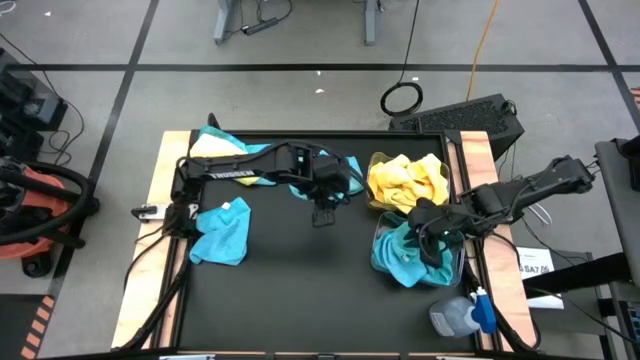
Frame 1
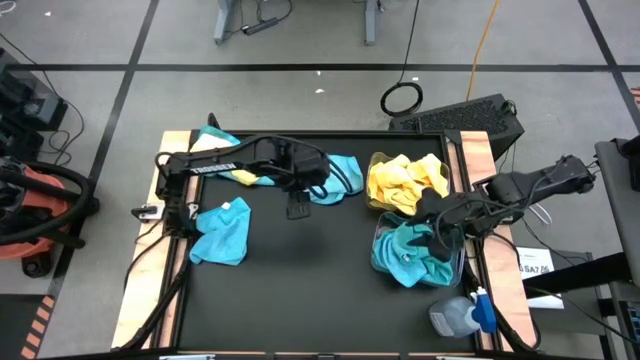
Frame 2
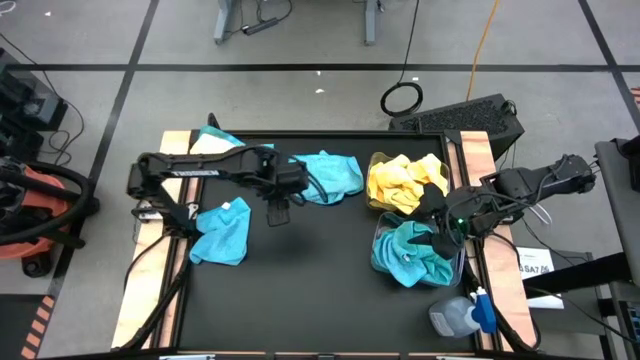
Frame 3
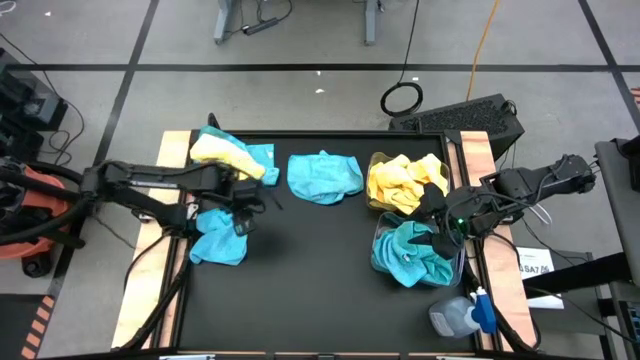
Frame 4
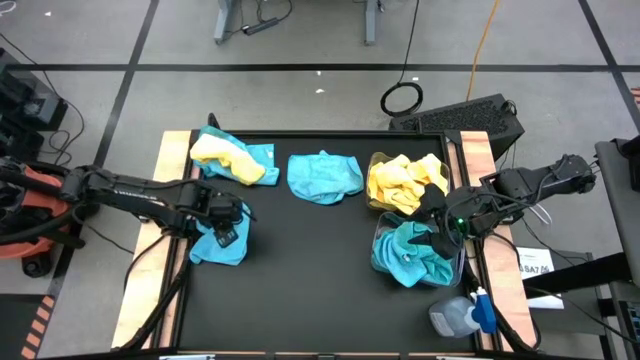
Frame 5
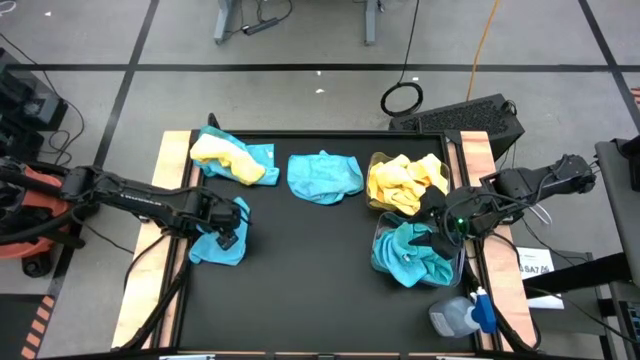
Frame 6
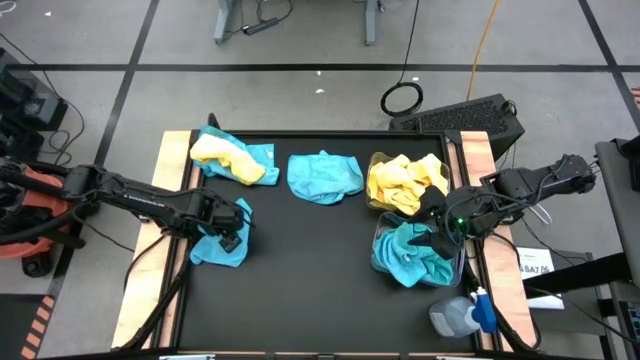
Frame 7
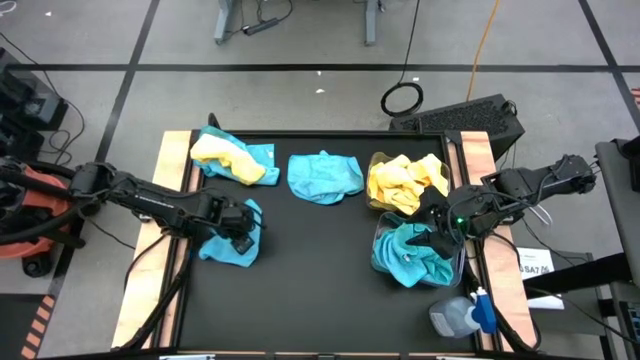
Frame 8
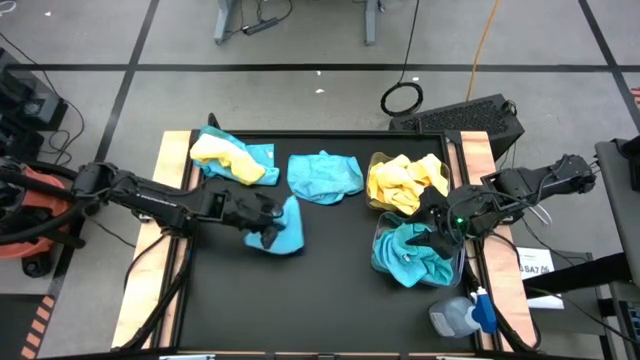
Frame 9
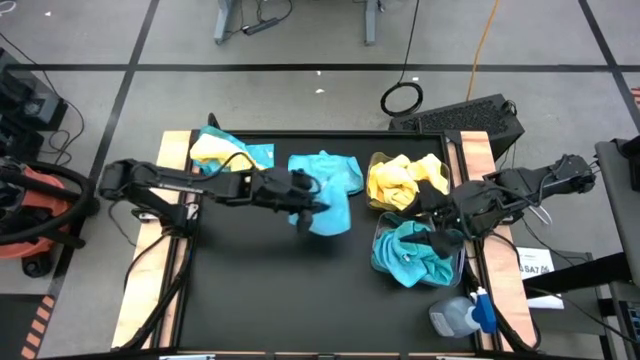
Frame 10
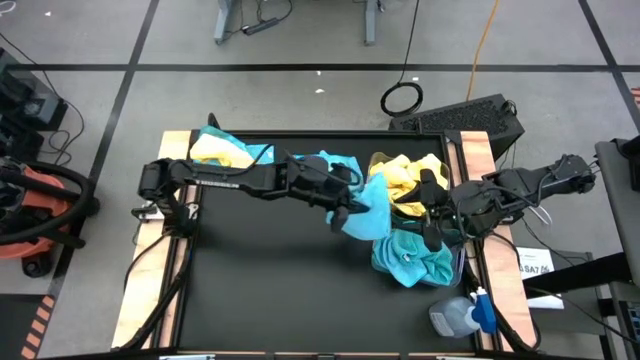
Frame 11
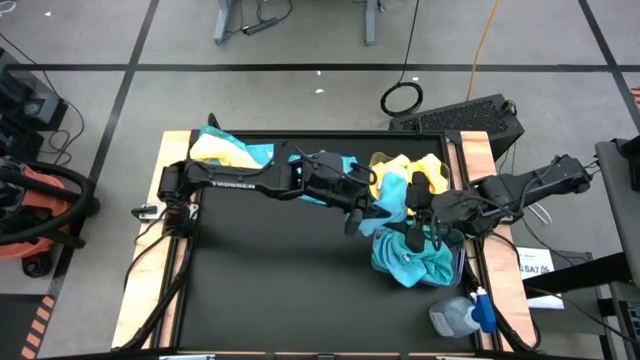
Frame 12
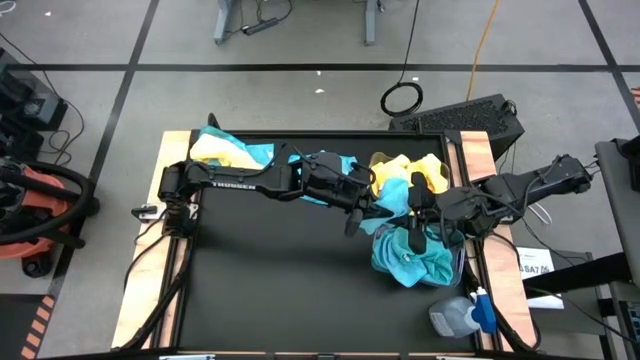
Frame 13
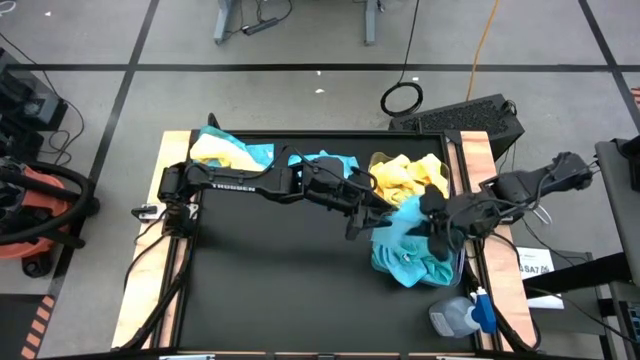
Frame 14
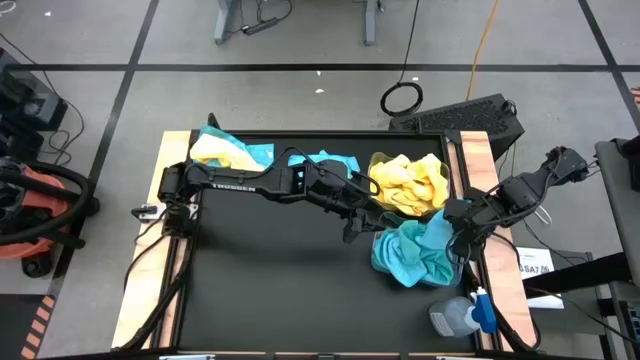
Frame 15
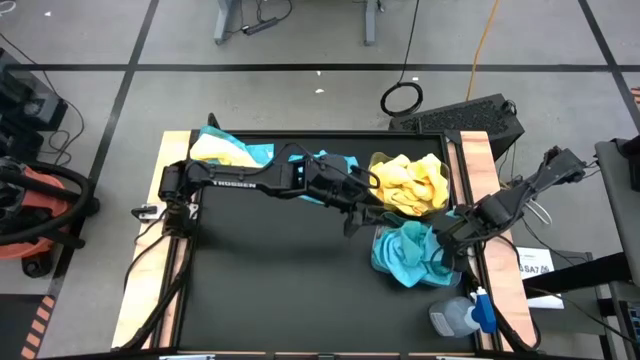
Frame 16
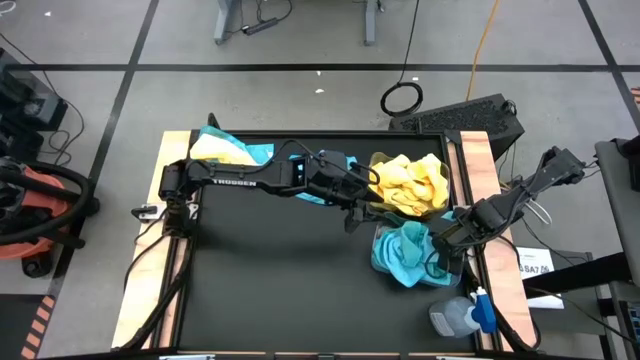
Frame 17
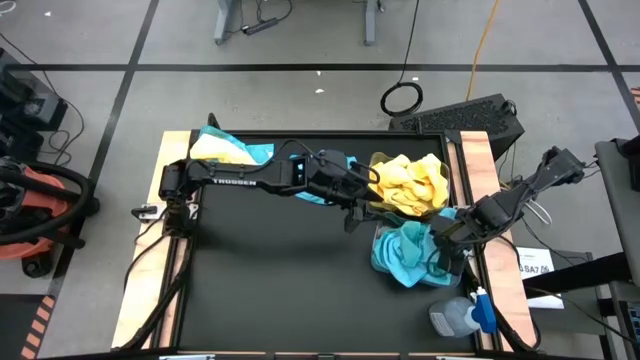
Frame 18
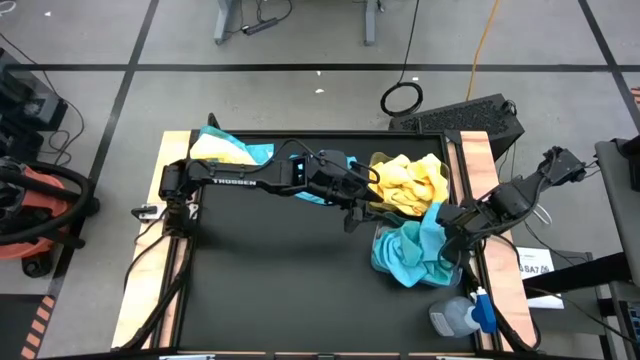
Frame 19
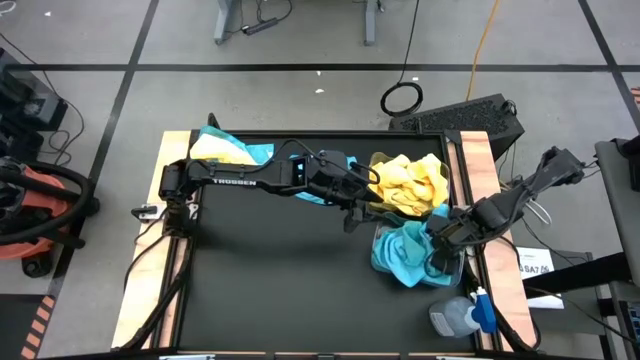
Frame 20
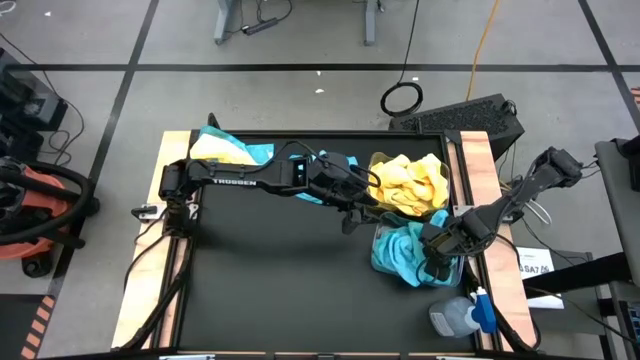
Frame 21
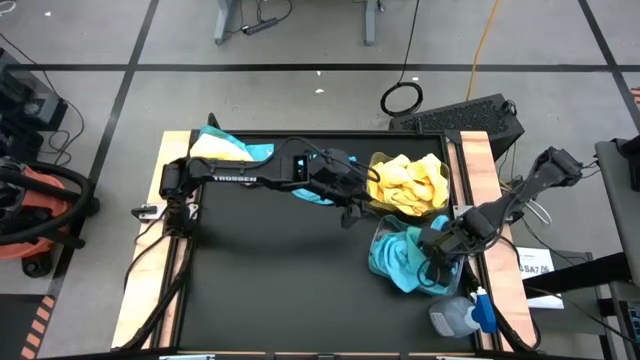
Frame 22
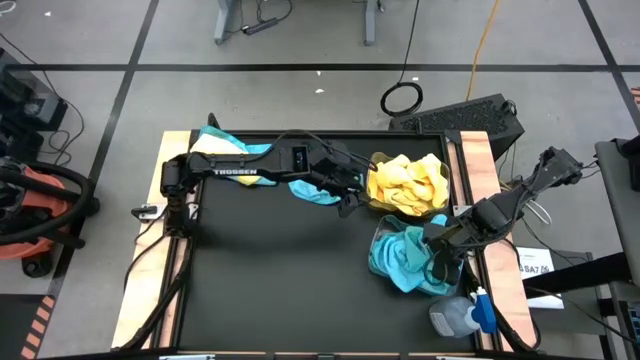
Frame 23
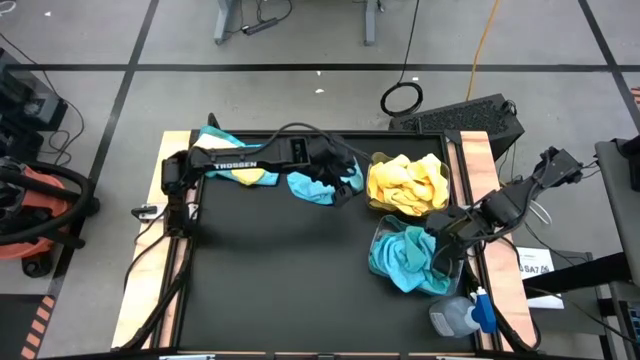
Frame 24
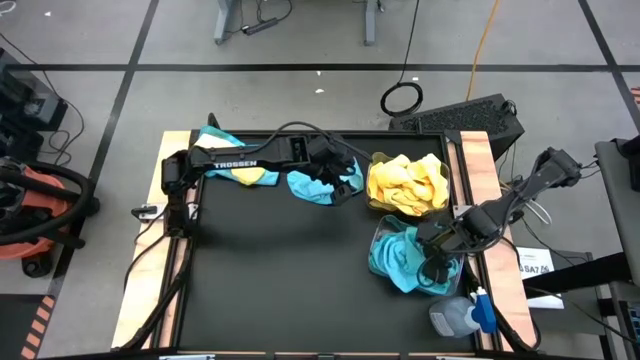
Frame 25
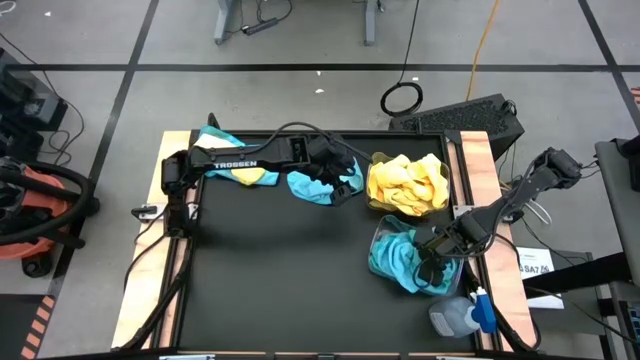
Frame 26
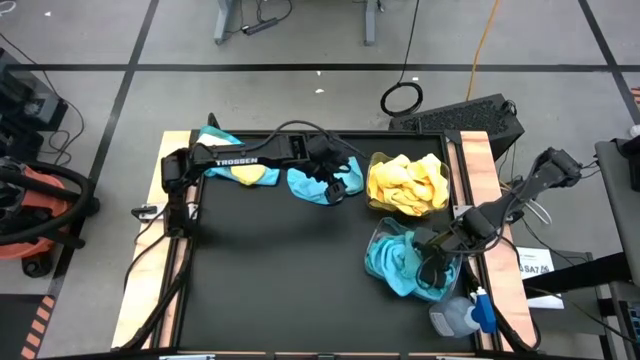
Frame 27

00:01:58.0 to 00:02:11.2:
Task: Sort microfiber towel by color & place in baskets
Put the blue microfiber cloth into the bottom transparent bin

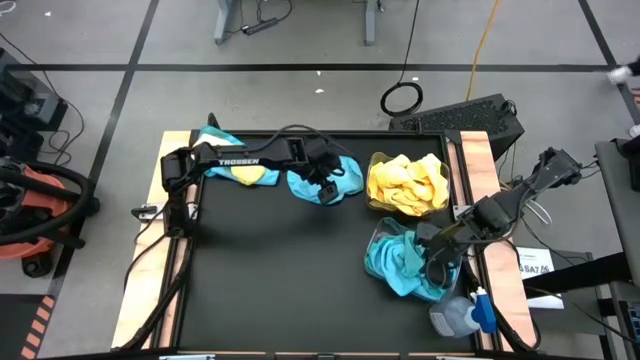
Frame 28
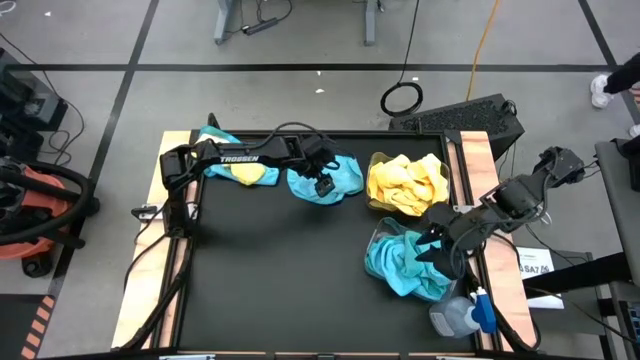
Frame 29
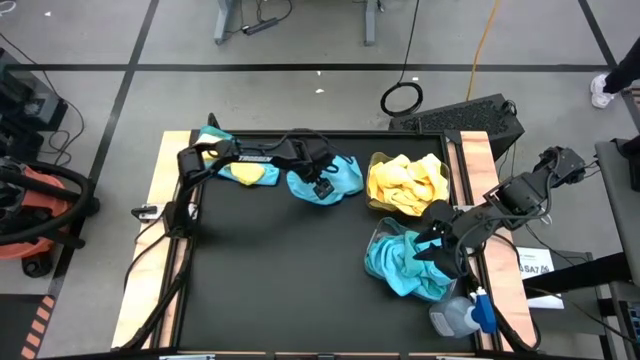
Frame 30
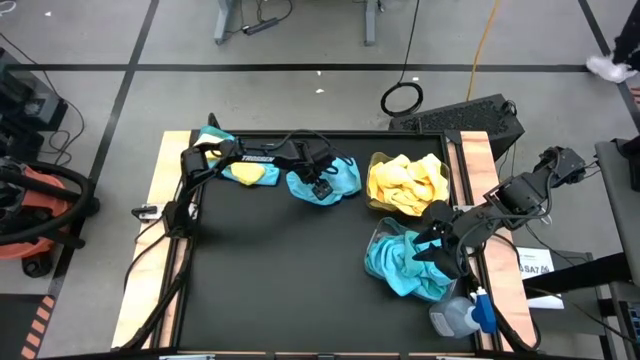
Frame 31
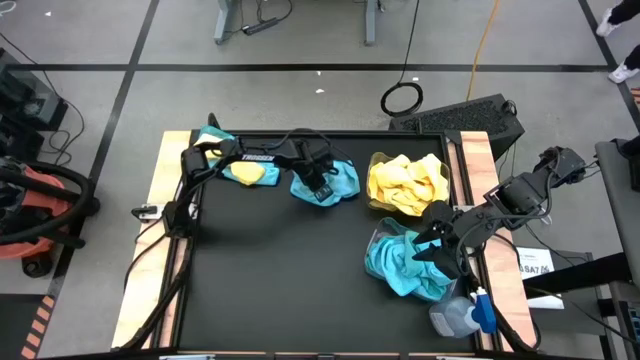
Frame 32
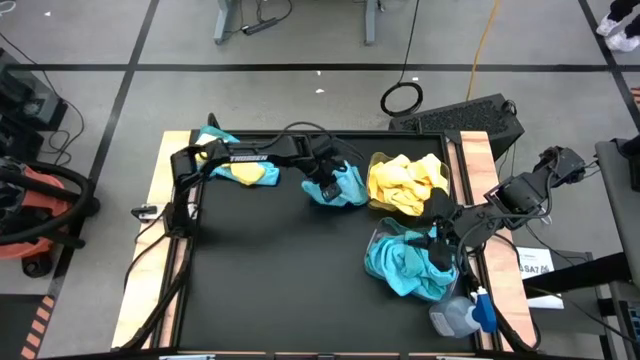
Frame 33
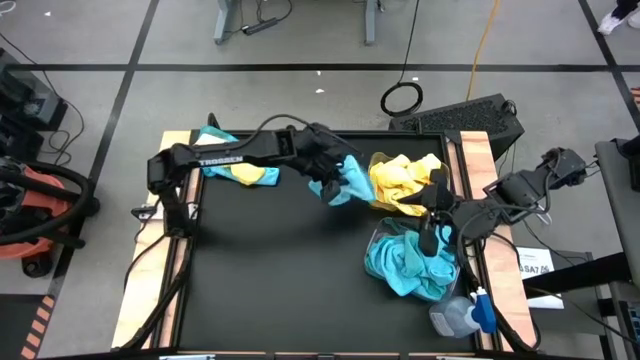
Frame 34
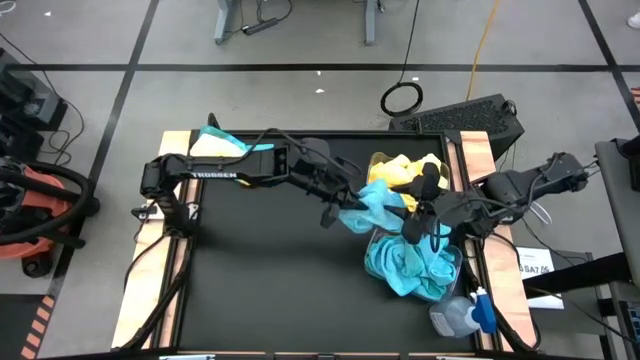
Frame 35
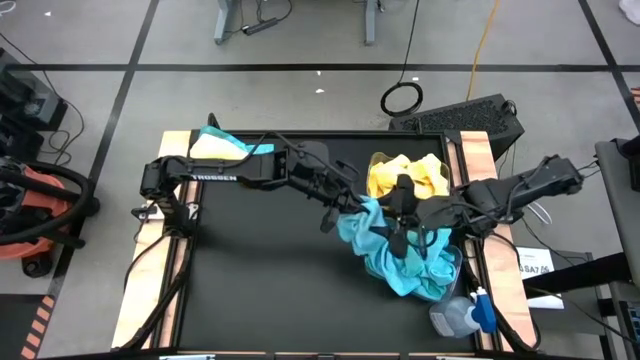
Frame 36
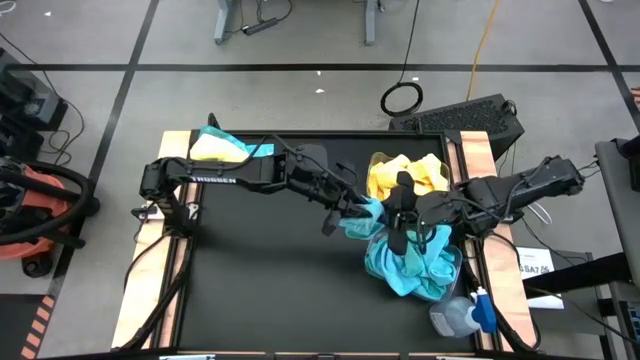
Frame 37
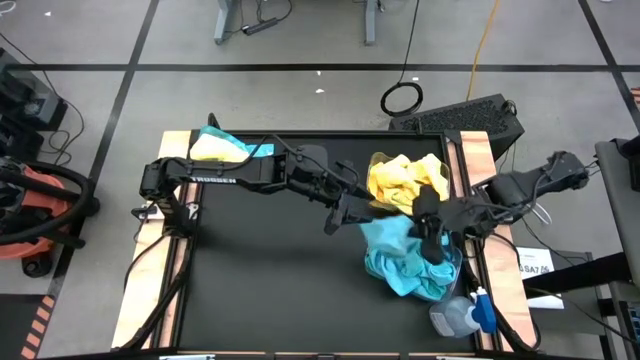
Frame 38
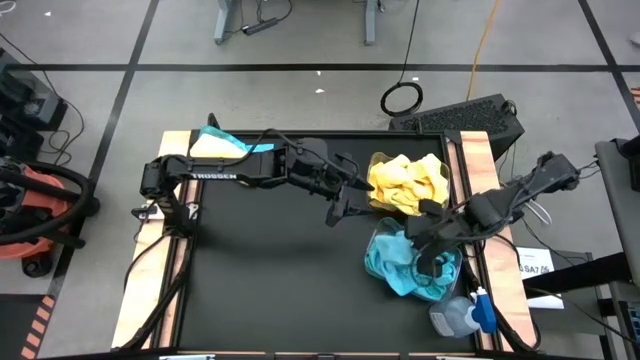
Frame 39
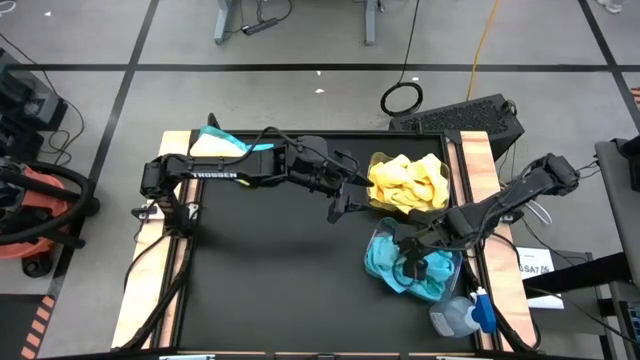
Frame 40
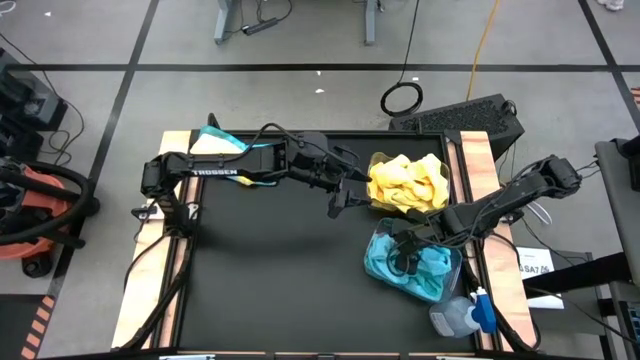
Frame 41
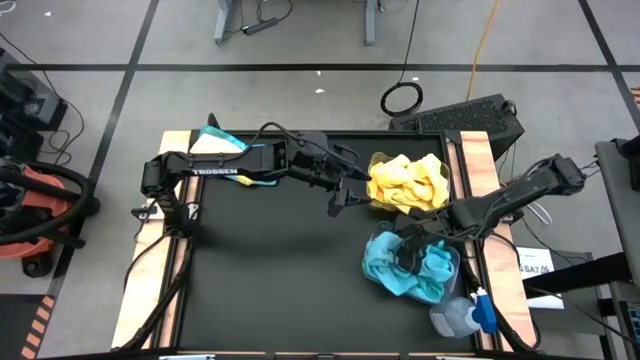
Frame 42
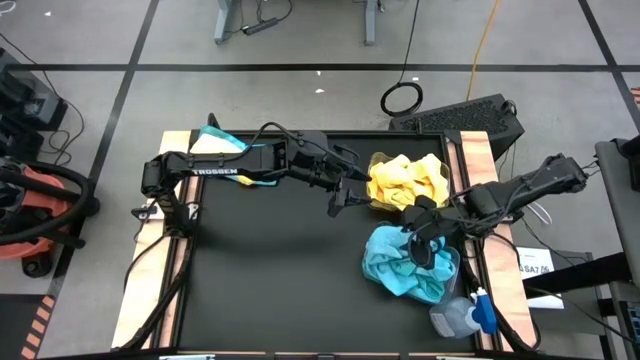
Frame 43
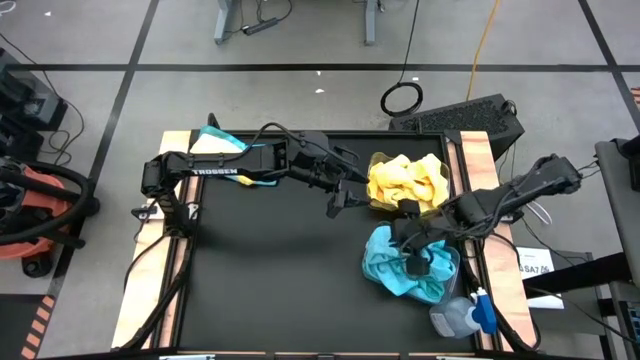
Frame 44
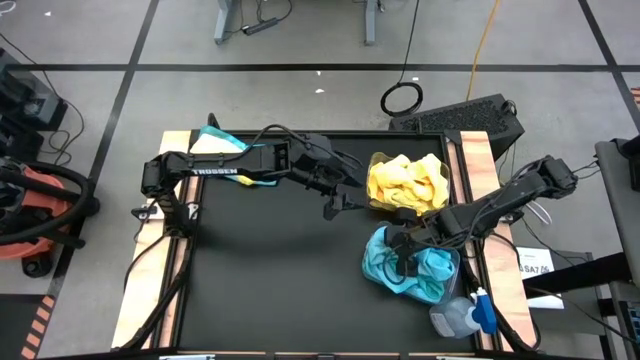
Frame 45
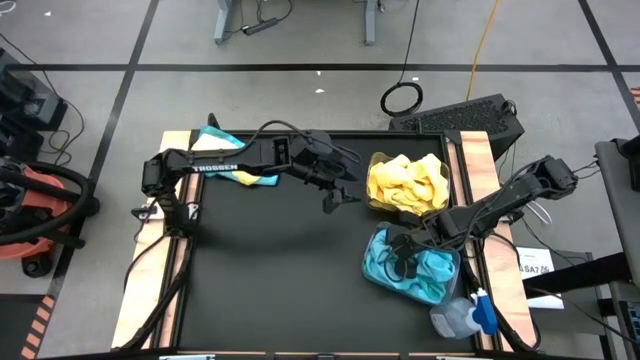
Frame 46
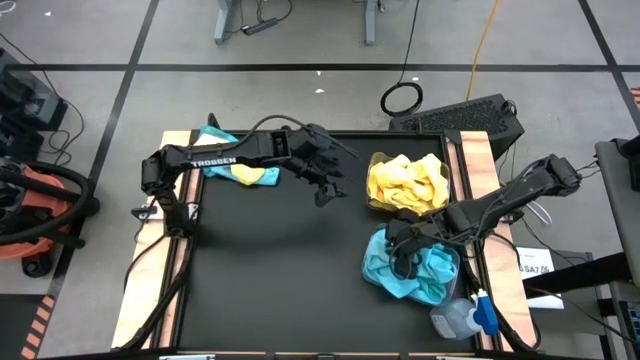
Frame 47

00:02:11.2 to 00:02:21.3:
Put the blue microfiber cloth into the bottom transparent bin
